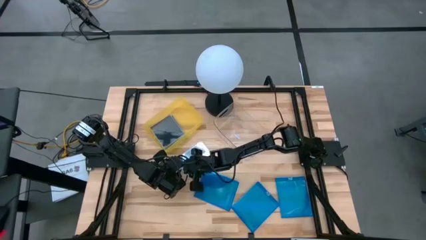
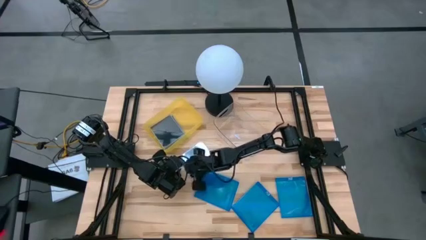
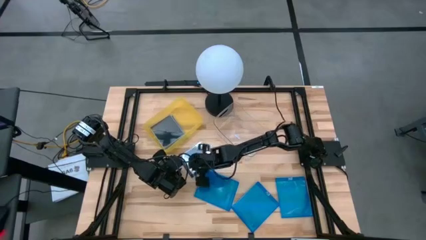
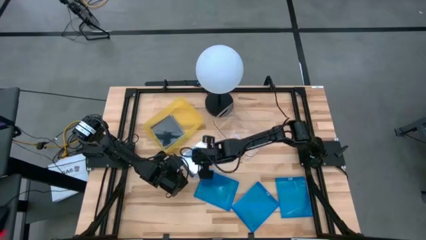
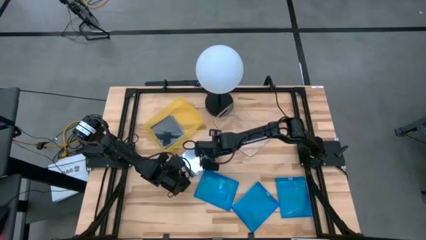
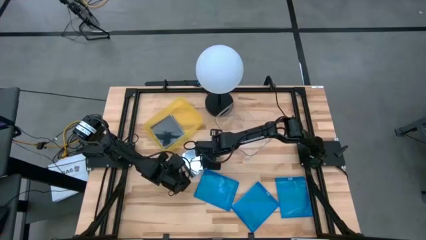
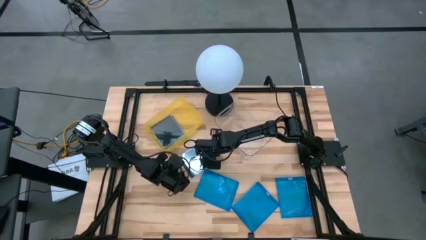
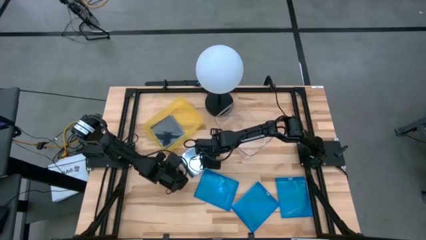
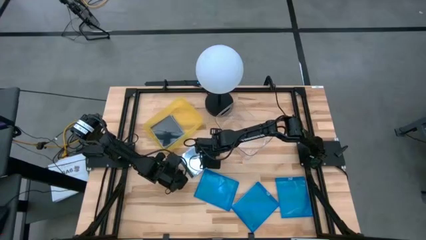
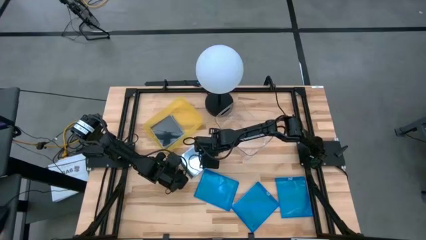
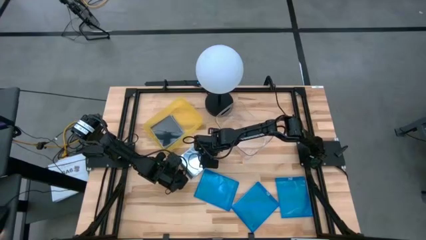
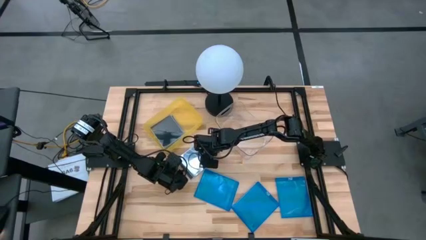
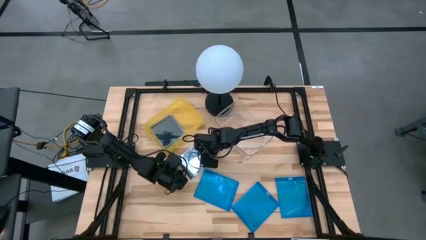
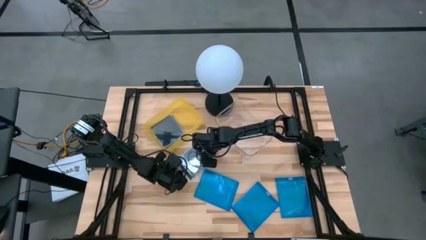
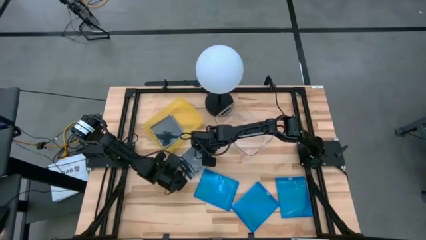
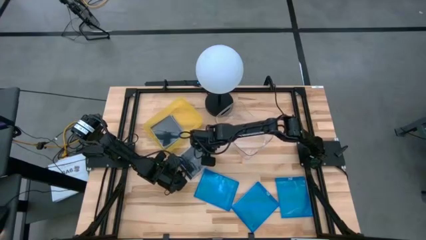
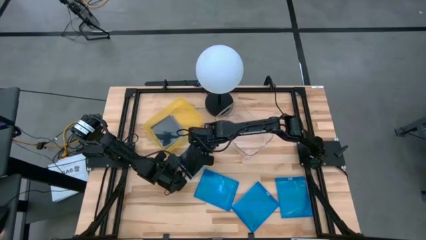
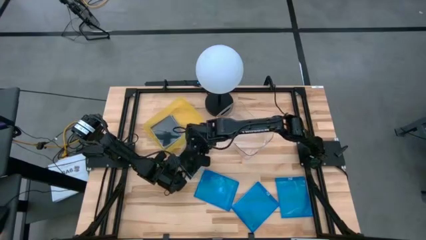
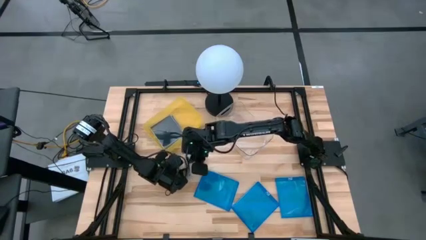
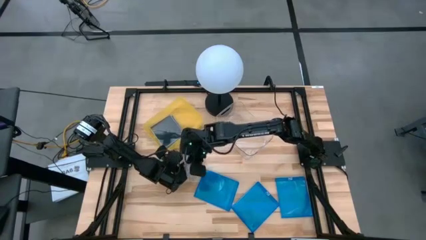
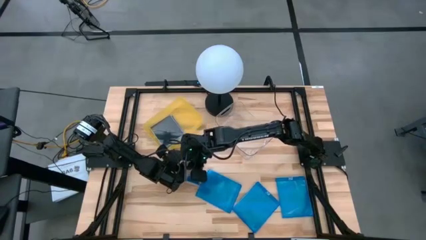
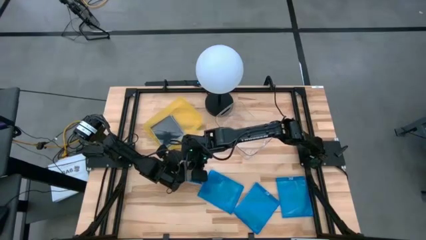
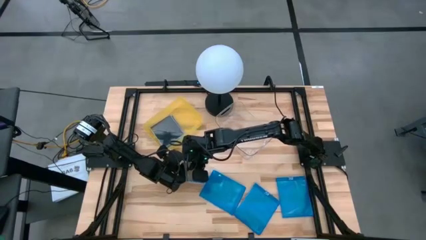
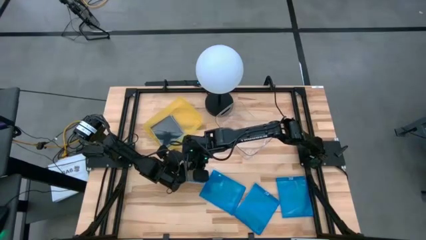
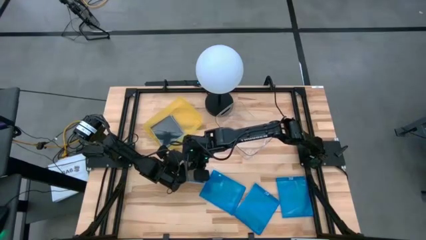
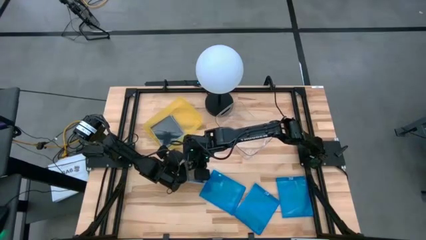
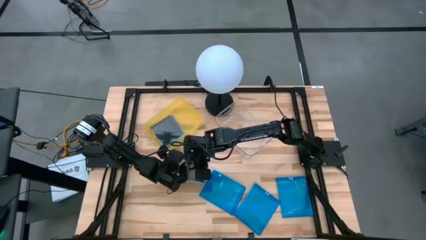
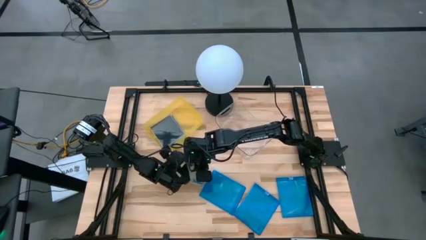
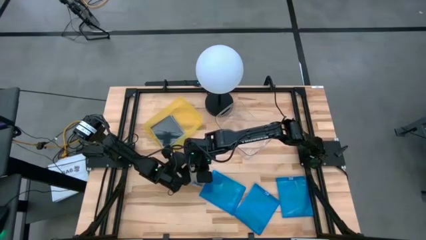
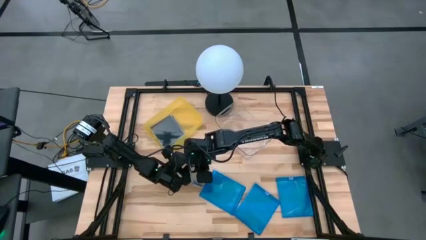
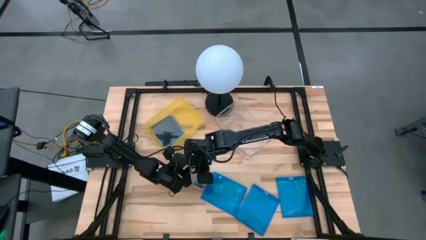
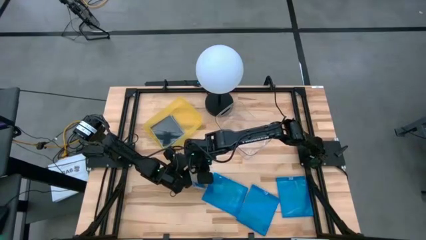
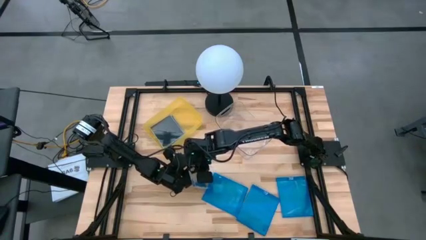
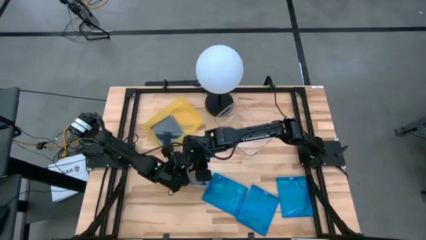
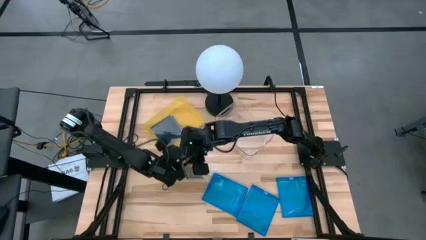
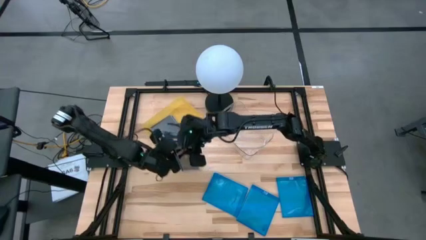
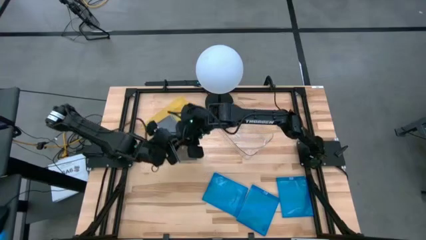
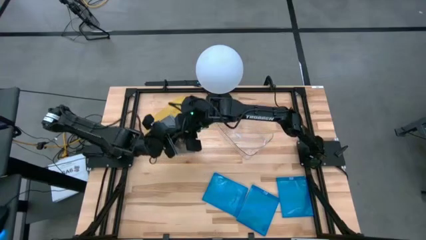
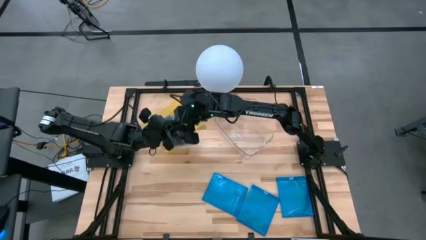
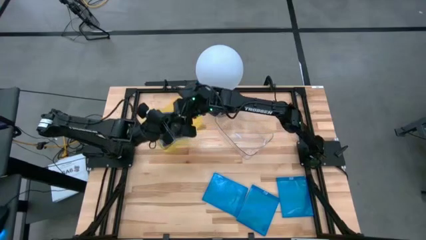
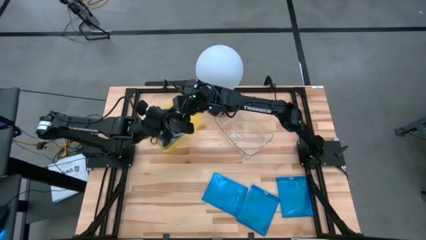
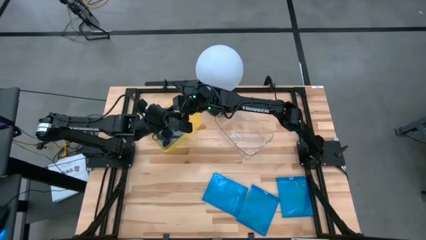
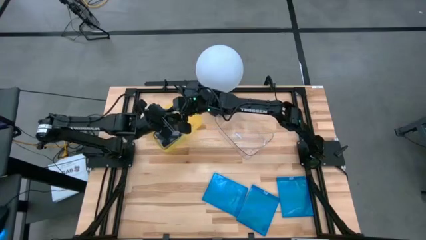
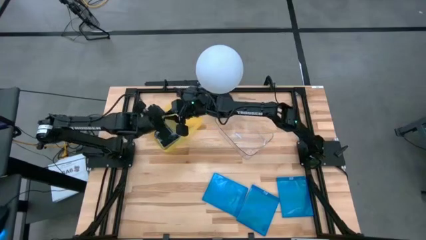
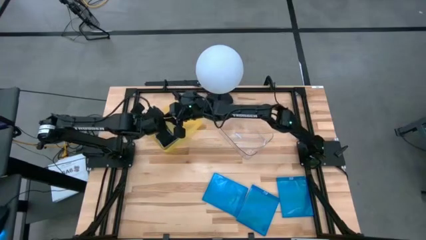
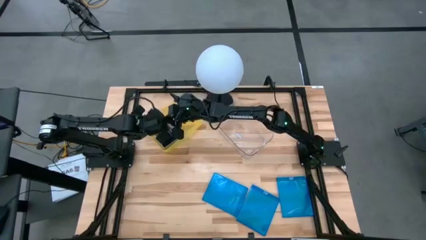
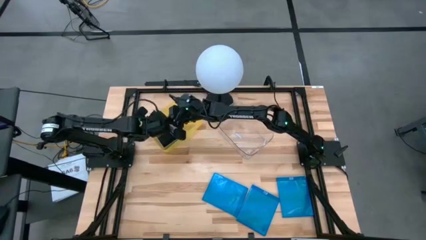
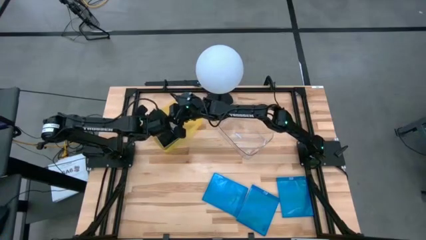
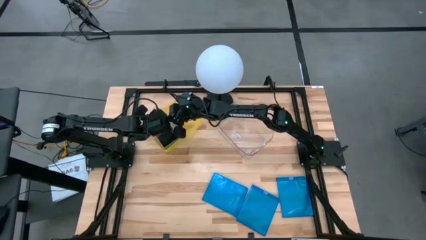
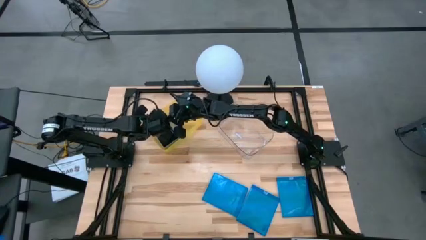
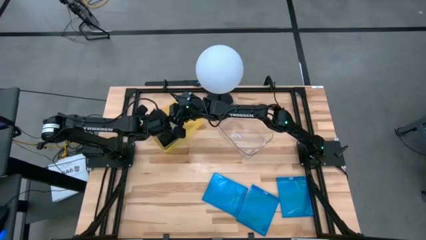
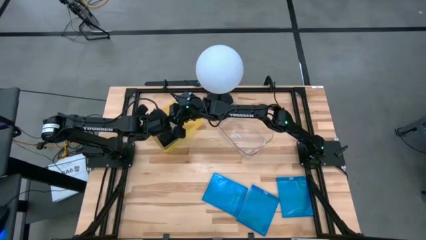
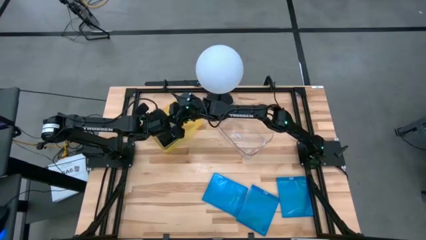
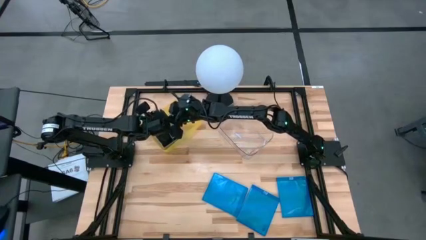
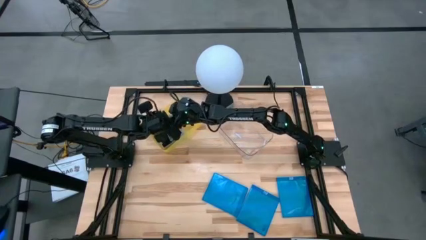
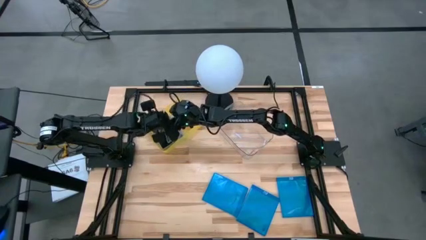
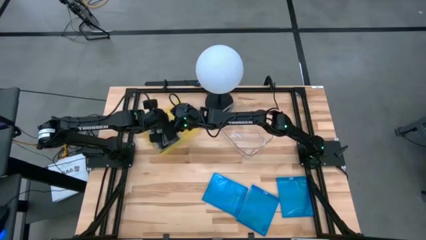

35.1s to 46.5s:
Task: Pick & place jewel cases by type
Put the black CD case into the yellow bin
